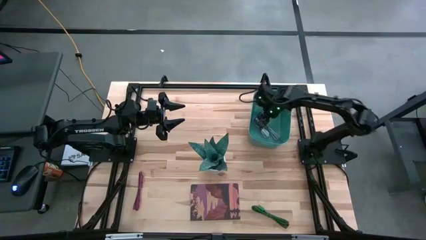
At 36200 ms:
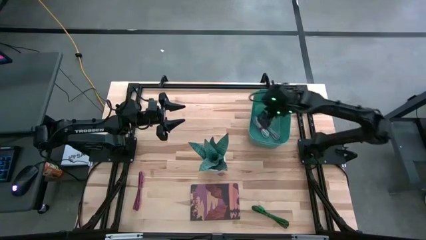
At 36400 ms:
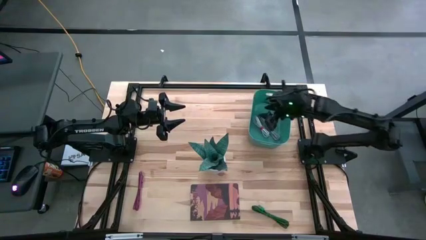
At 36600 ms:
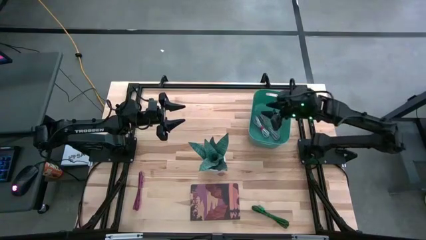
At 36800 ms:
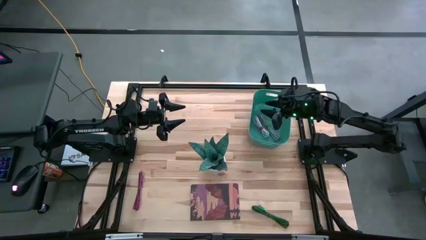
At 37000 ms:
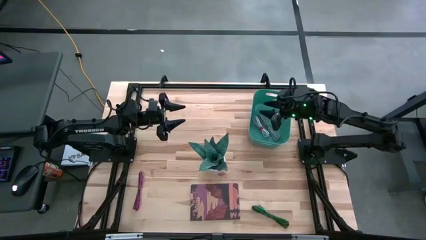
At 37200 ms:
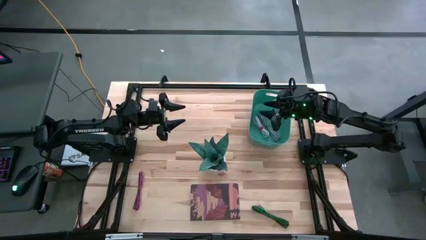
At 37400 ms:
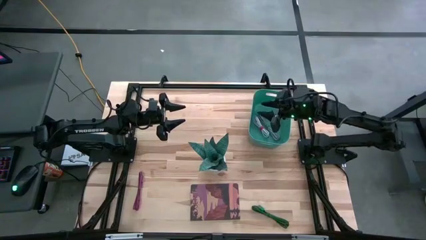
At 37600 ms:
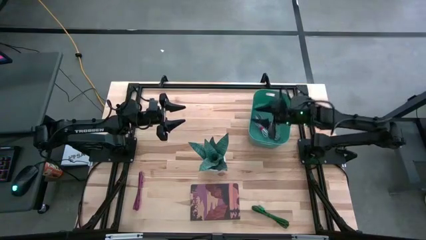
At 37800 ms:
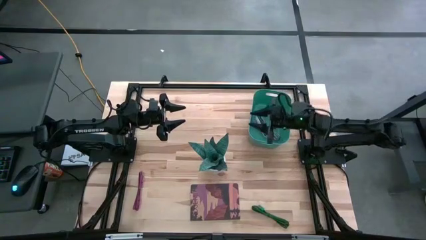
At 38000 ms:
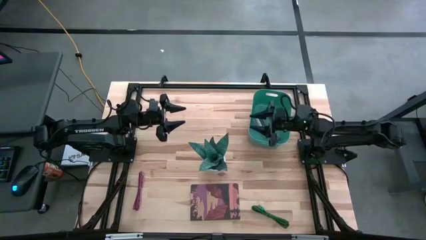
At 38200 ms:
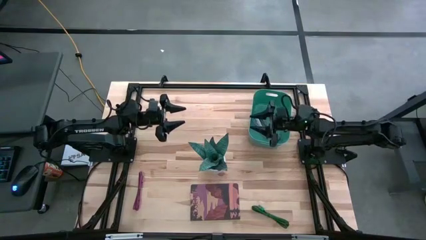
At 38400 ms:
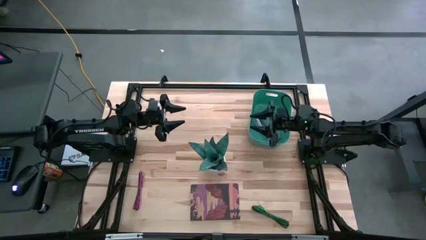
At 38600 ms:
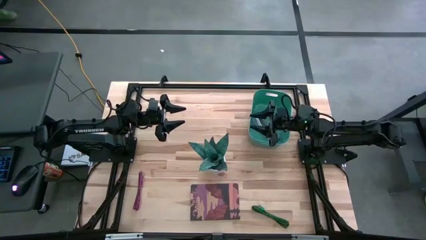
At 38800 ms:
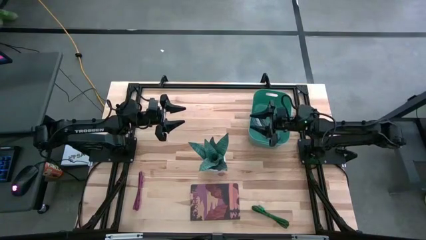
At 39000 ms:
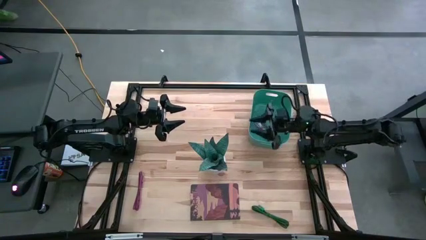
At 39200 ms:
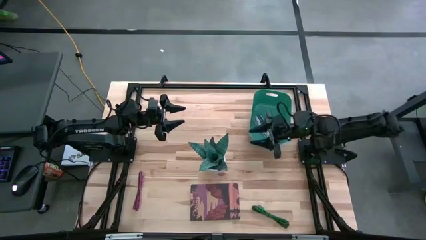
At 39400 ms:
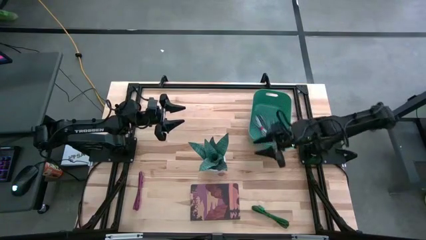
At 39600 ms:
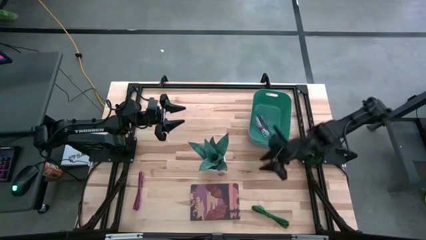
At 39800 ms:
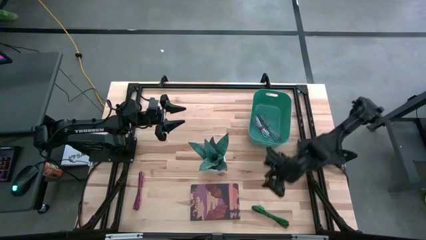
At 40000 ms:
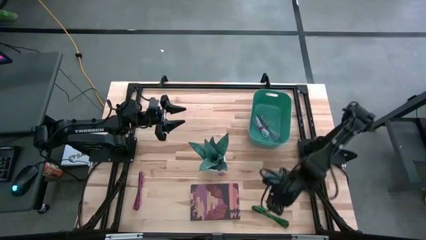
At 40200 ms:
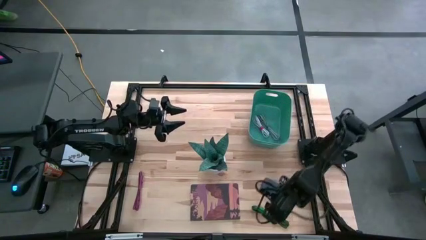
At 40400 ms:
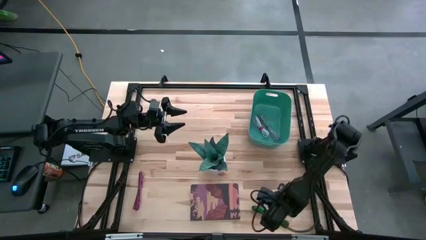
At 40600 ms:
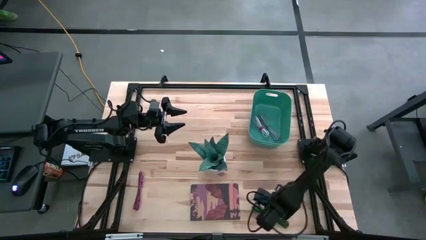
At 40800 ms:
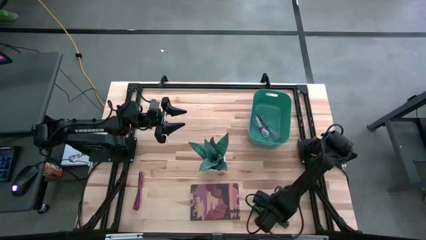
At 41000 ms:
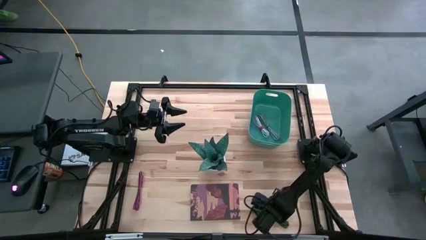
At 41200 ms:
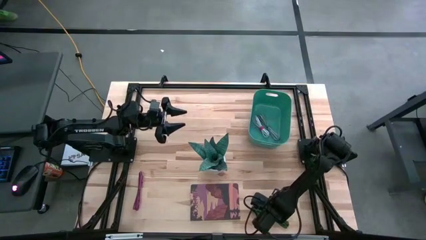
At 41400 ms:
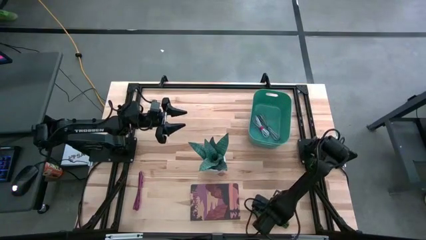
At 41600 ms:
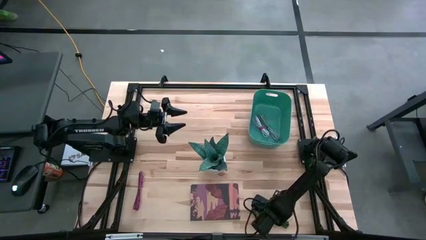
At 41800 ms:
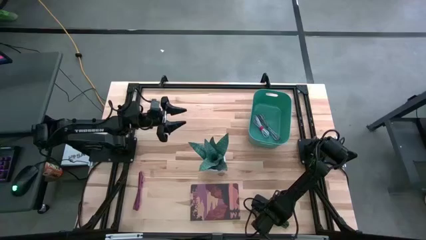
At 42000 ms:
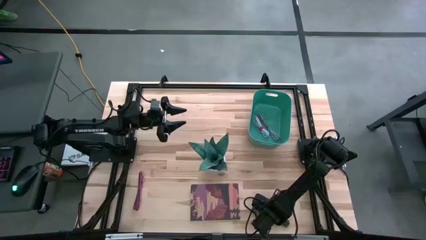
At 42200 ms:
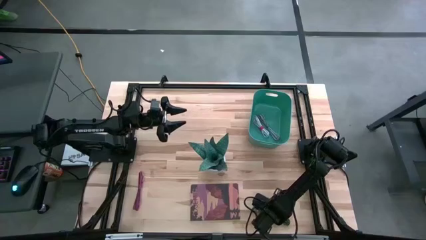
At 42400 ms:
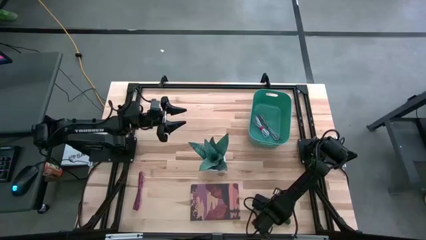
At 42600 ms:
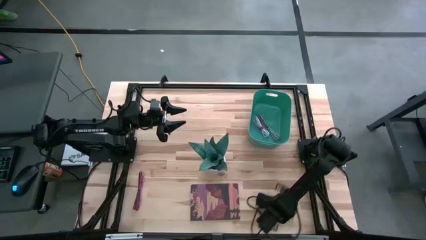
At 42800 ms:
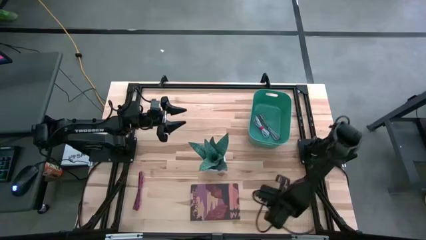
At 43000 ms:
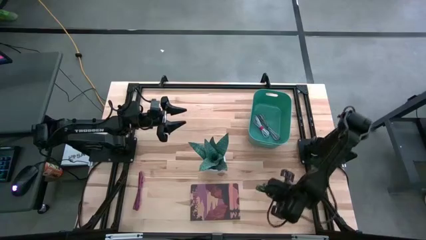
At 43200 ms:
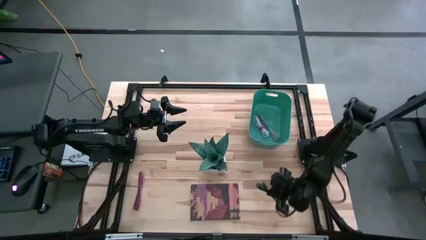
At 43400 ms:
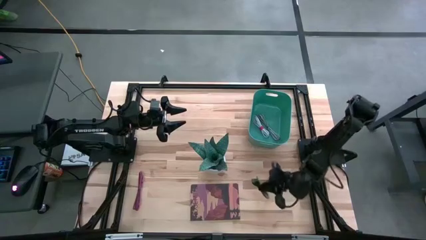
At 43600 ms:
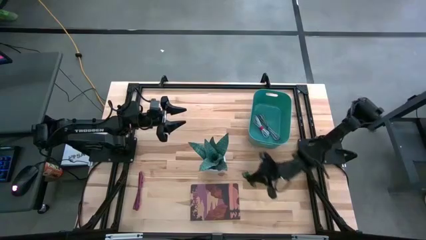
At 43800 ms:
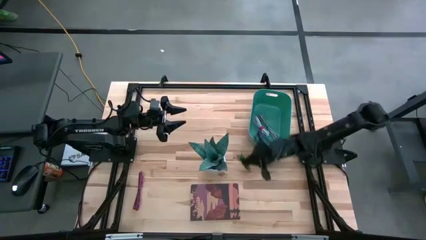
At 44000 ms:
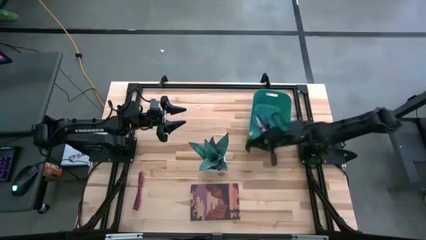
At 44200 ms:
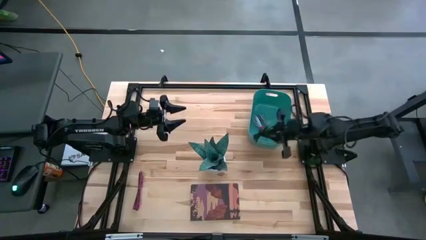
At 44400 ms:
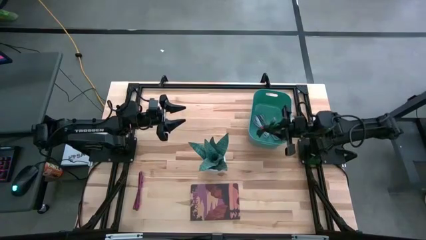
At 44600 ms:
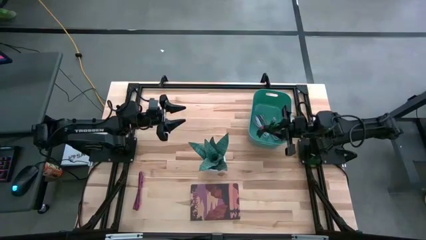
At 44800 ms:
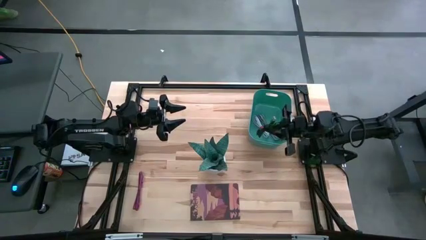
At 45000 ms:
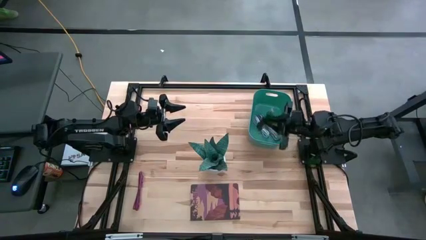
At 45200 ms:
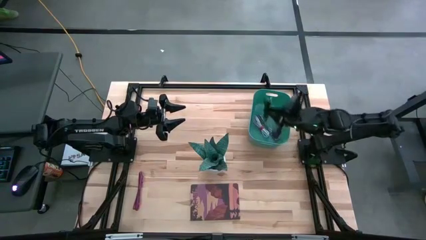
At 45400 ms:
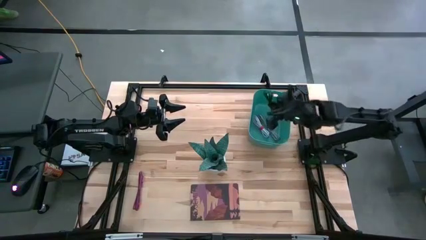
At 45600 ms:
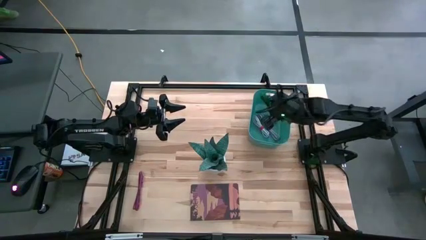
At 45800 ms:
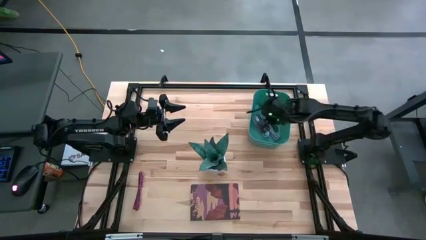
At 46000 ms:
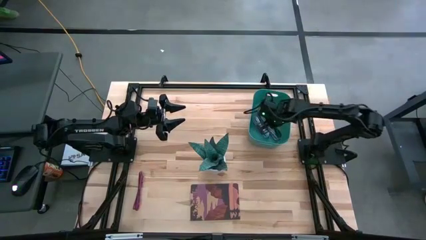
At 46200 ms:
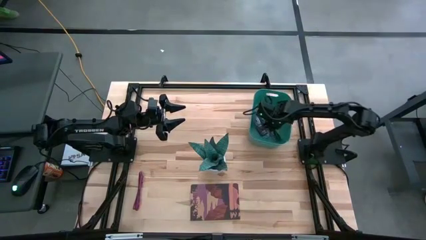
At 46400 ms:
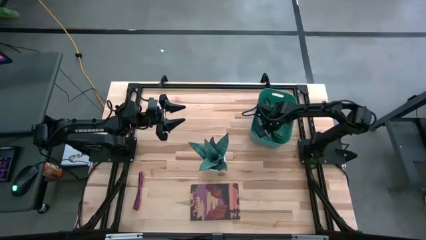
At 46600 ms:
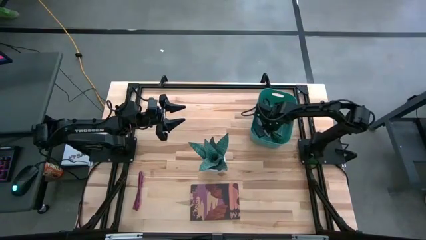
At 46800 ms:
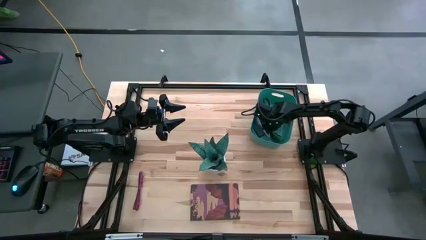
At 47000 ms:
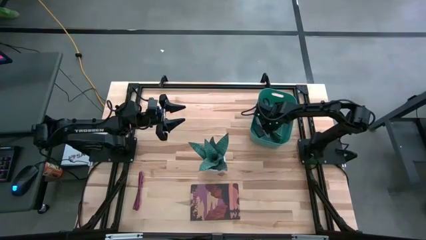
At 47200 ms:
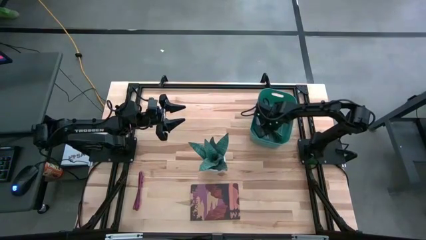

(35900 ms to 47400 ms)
Task: Pick and place USB-C Cables
Put the green patterned charger cable into the green container
